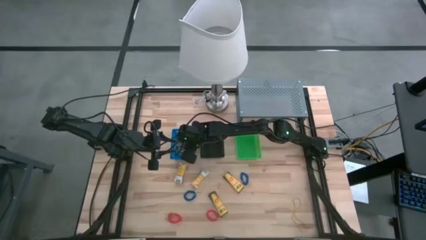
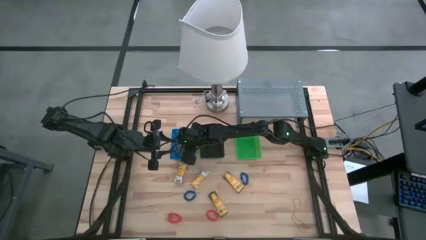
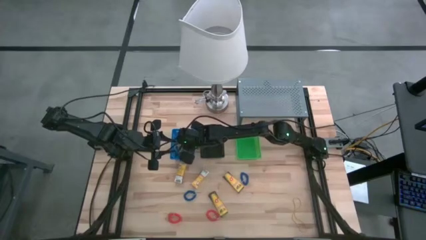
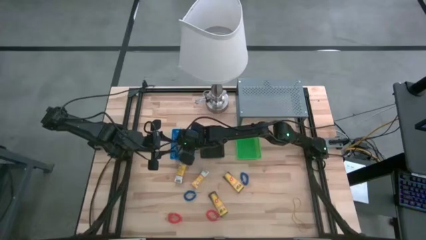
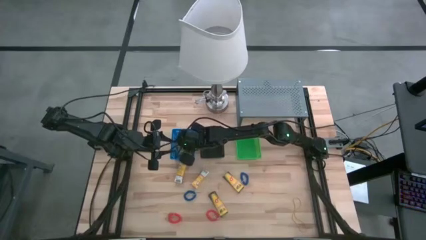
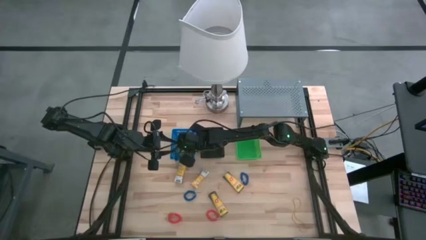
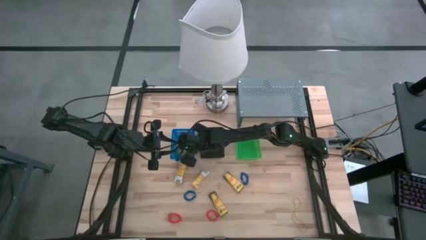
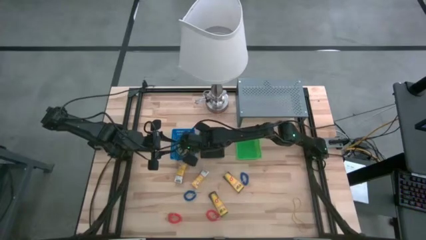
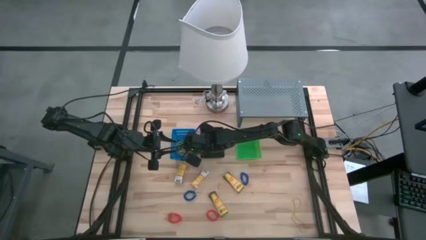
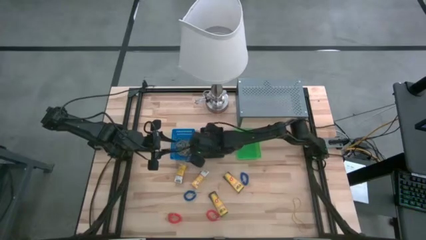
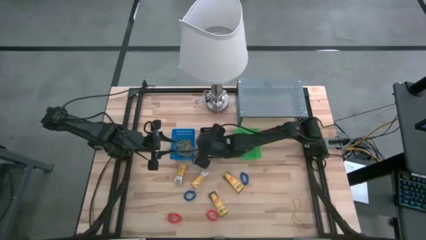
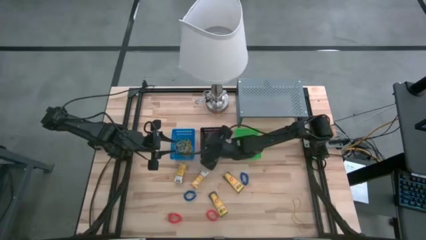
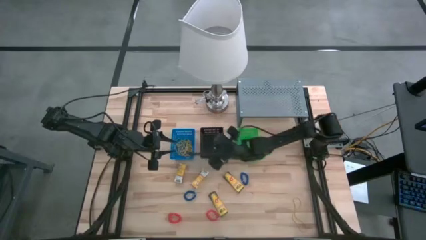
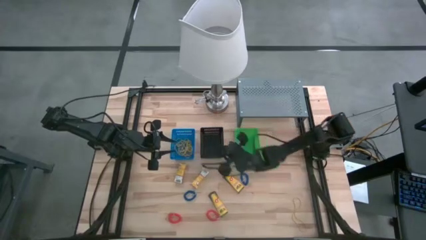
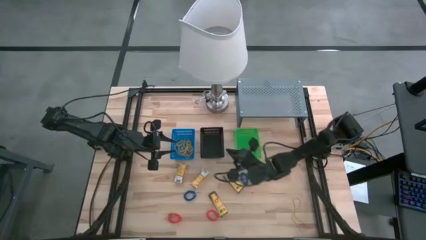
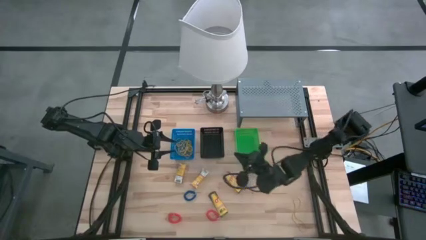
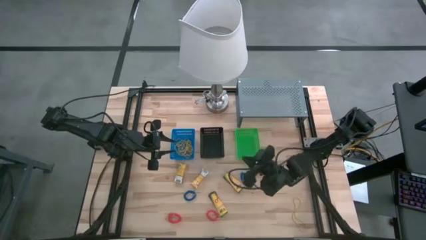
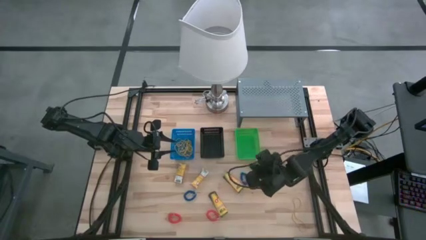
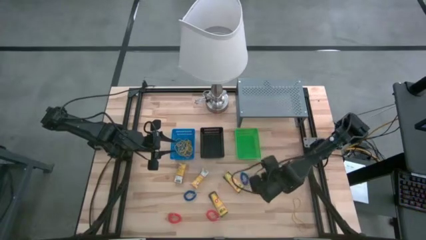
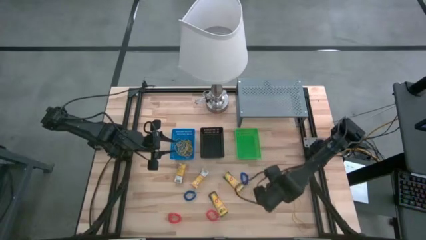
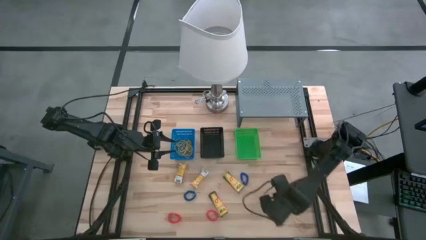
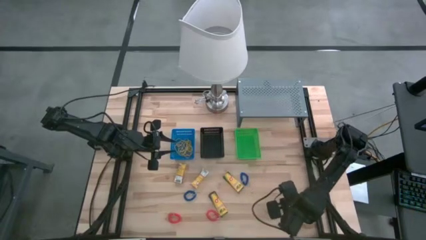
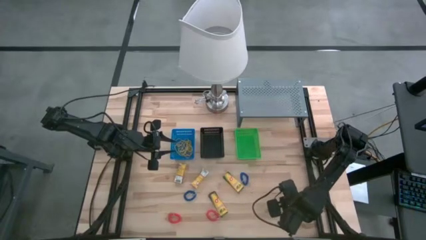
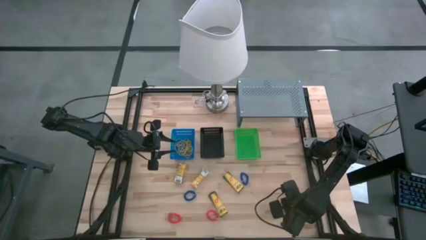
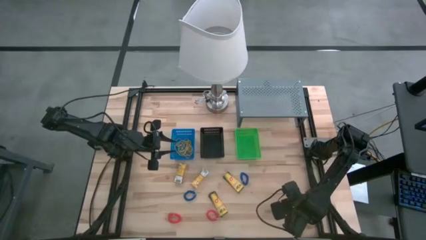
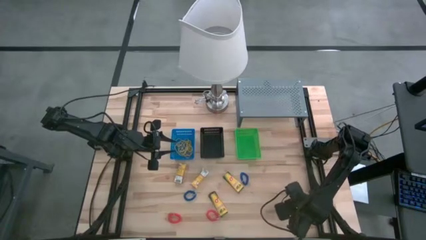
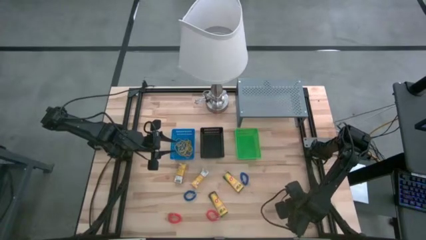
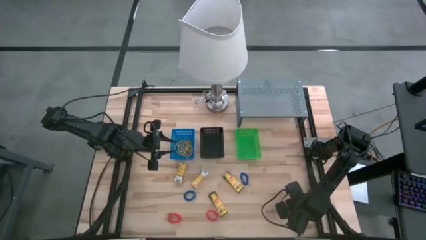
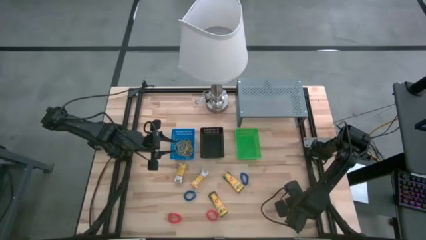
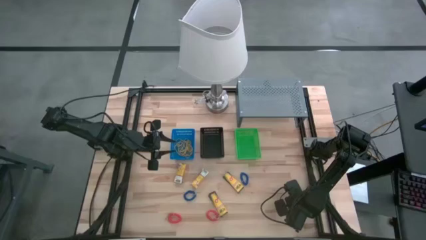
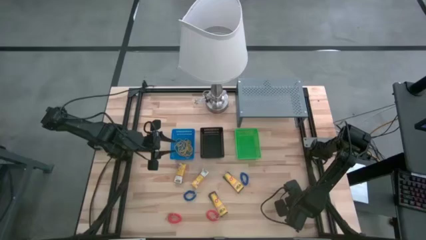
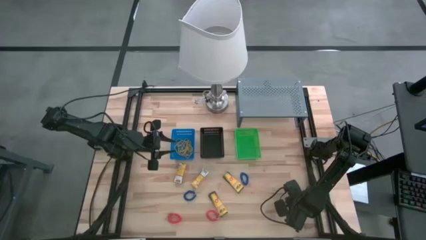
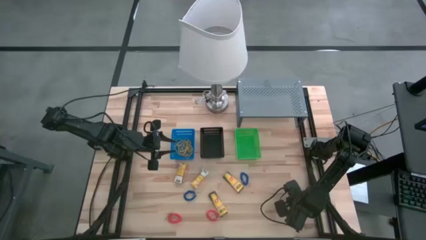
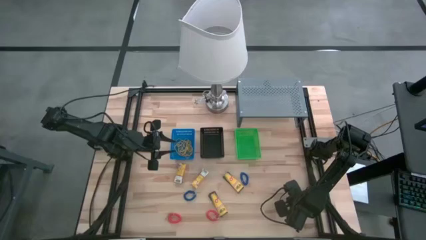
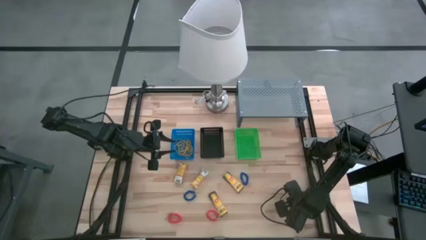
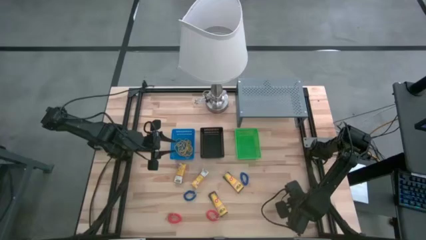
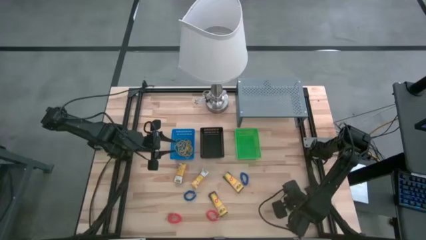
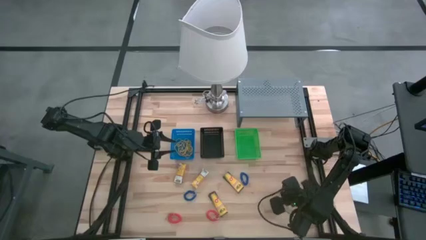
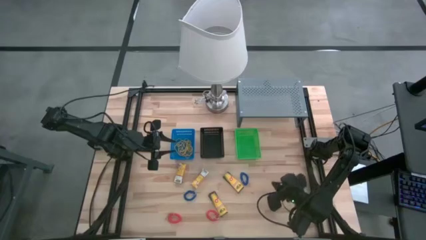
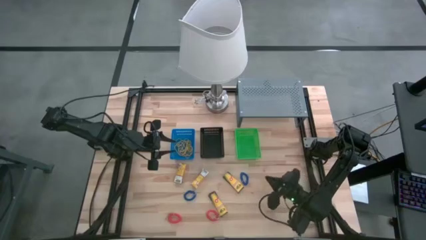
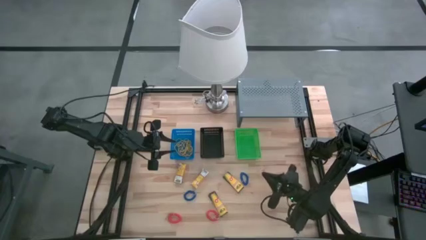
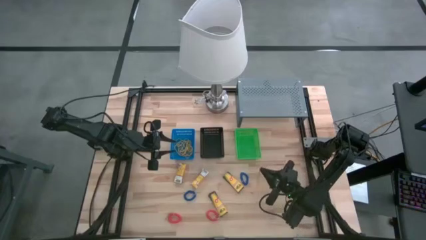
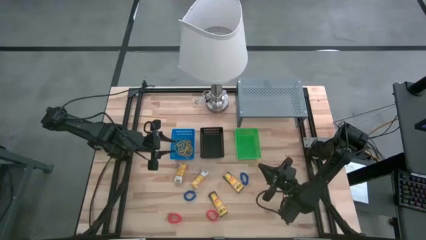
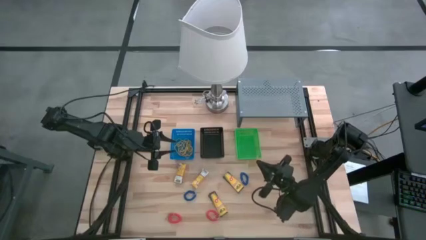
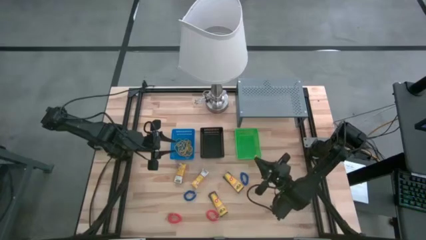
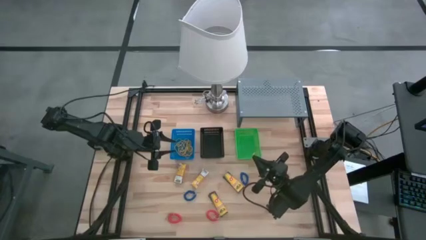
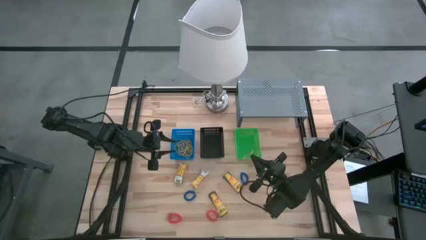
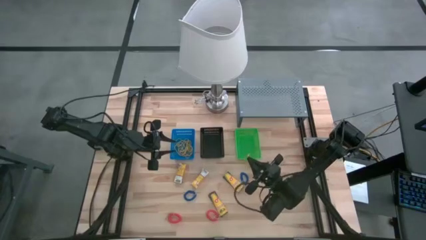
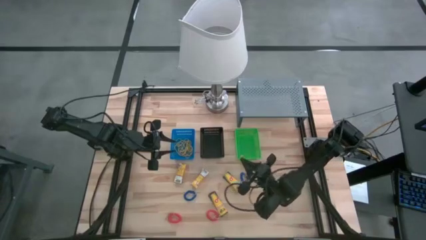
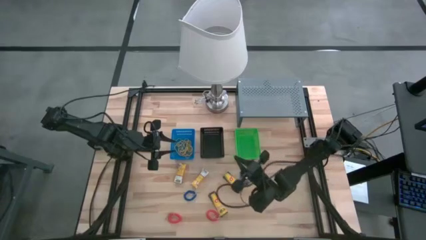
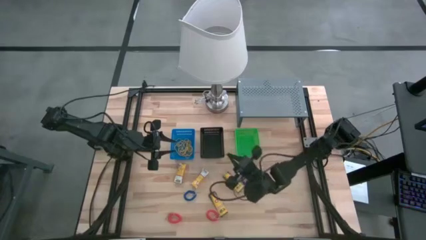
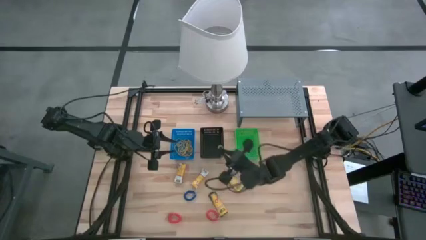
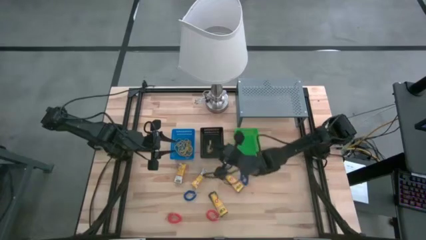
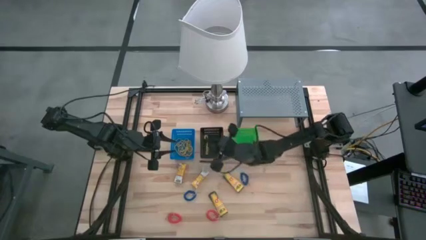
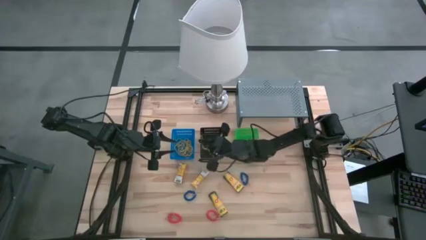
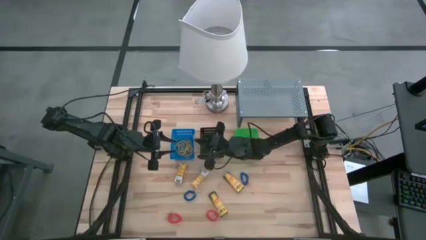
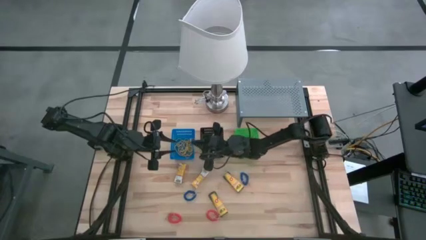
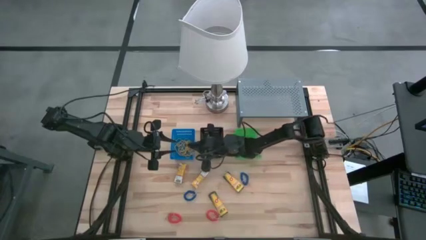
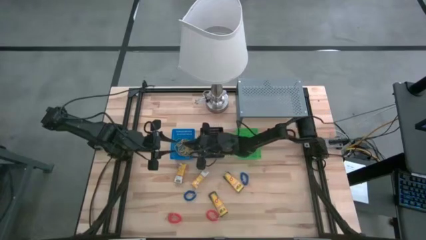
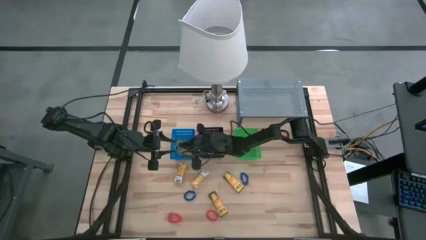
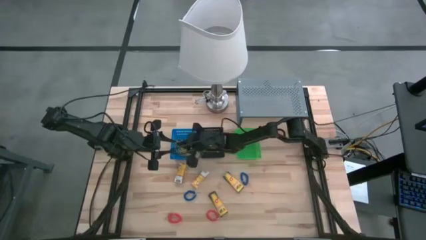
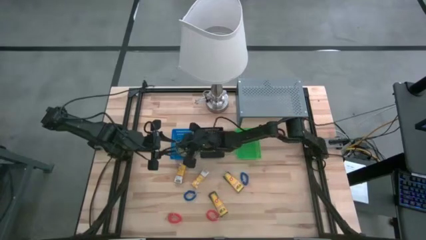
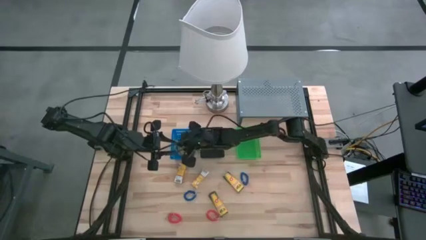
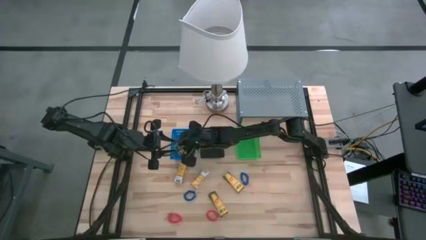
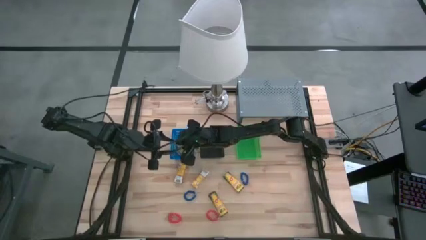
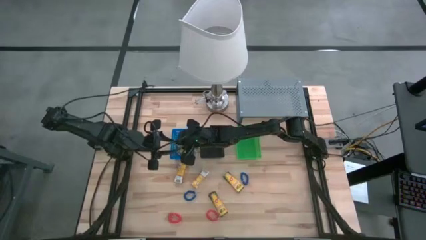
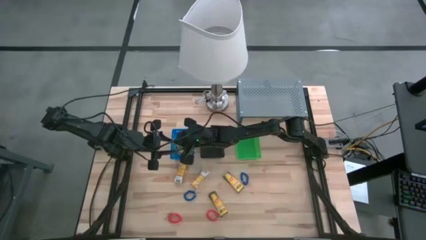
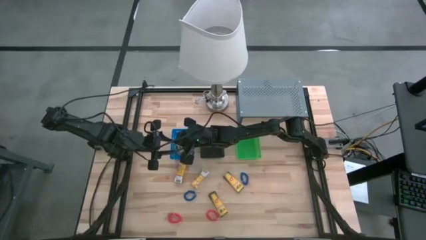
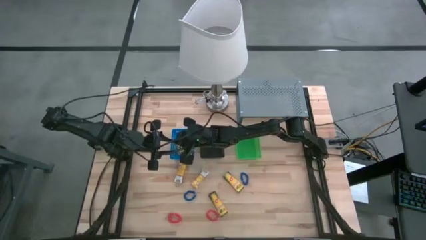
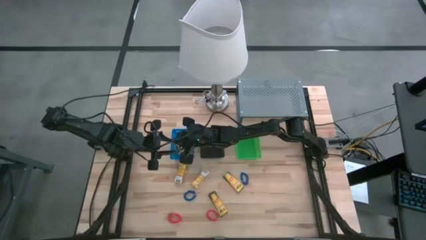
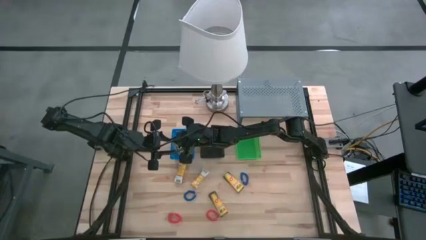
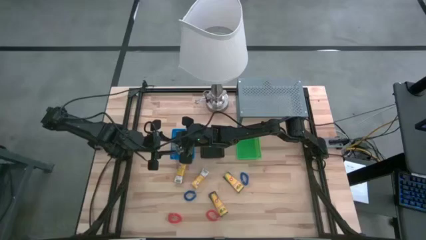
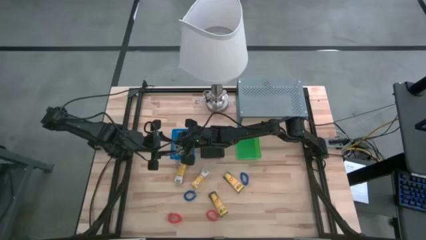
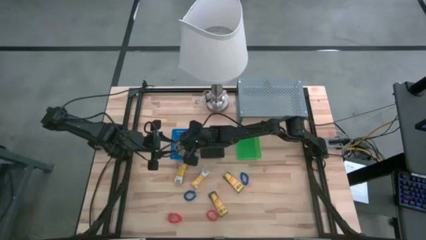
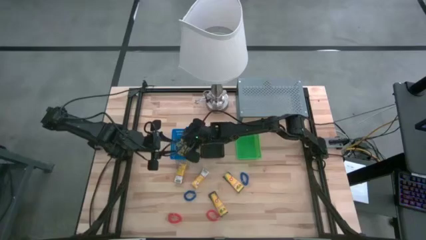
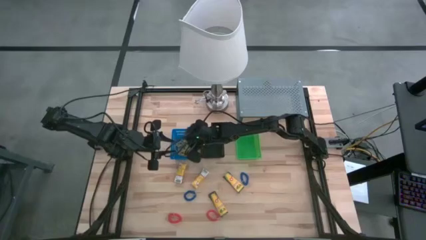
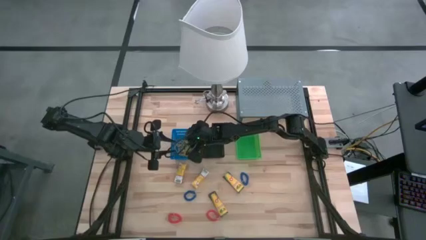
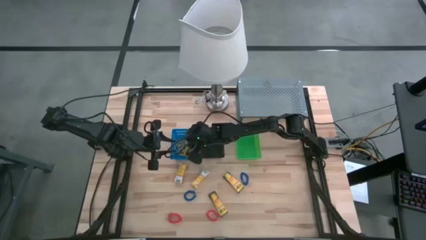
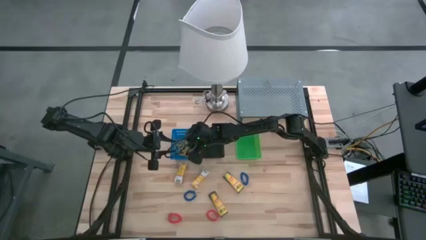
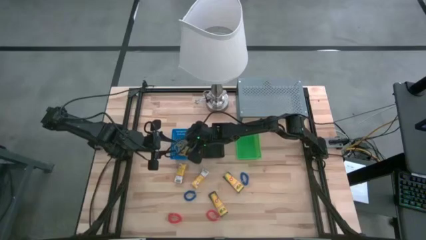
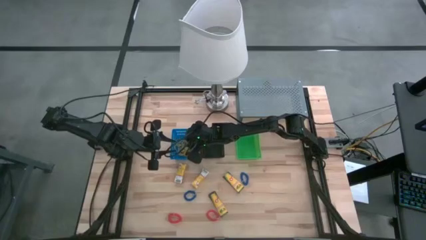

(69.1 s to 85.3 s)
Task: Pick & Place Office Desk Supplies
Put the yellow rubber band into the blue bin

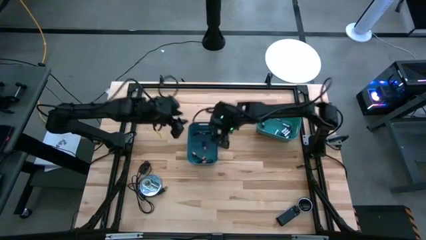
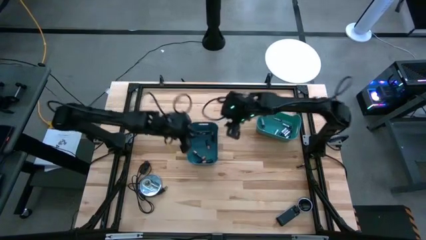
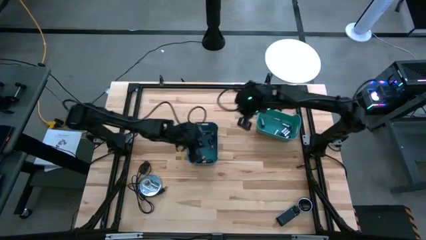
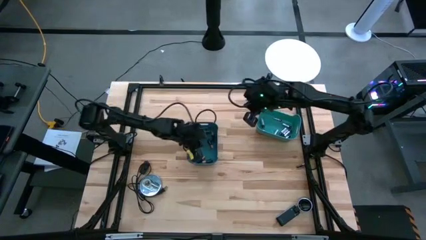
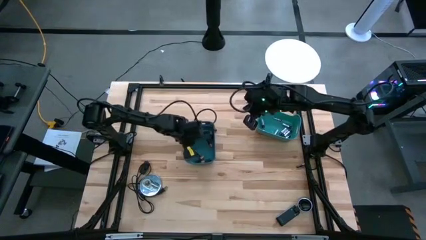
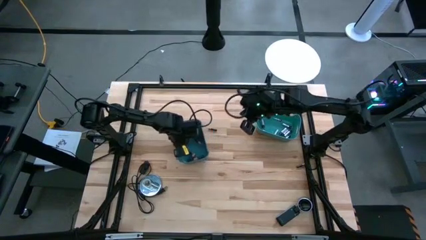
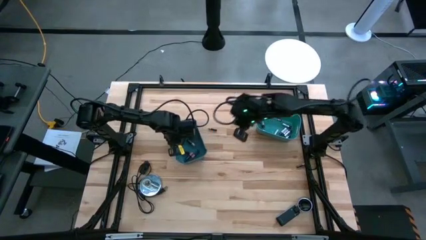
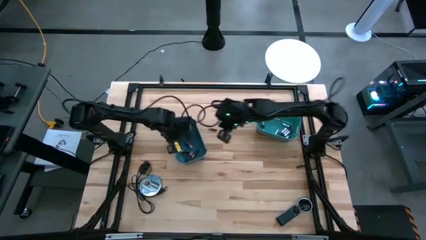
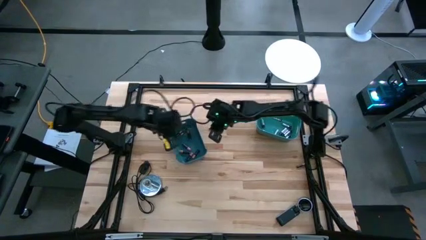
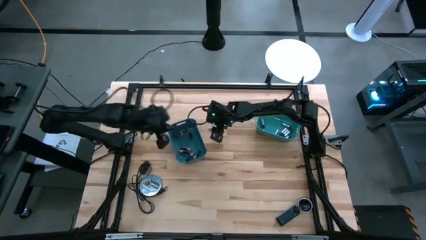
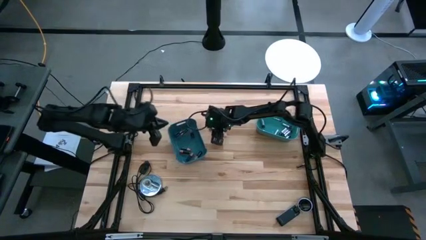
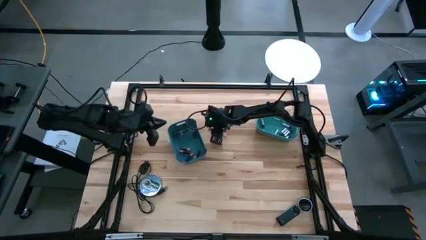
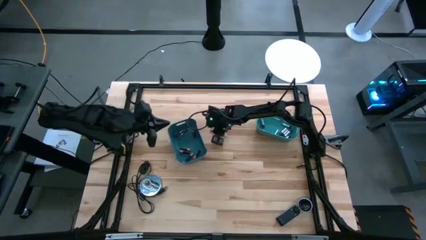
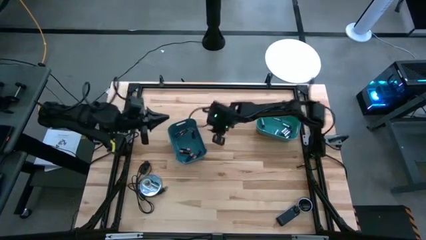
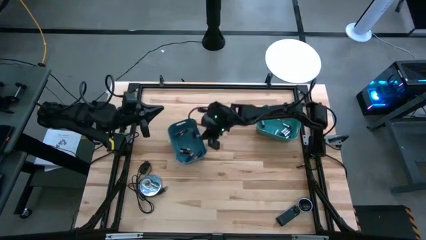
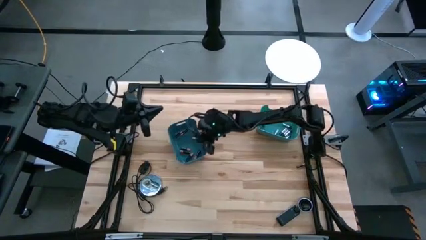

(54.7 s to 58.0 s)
Task: Sort batteries
Put the black battery into the blue bin
